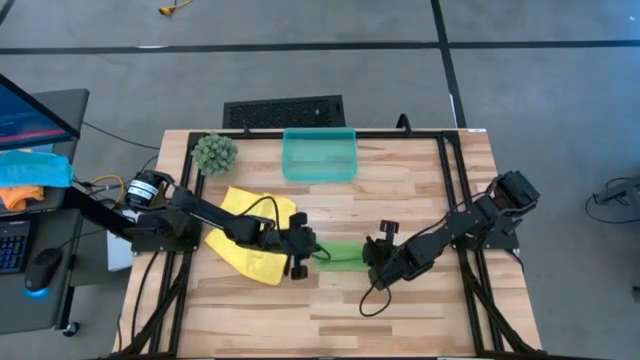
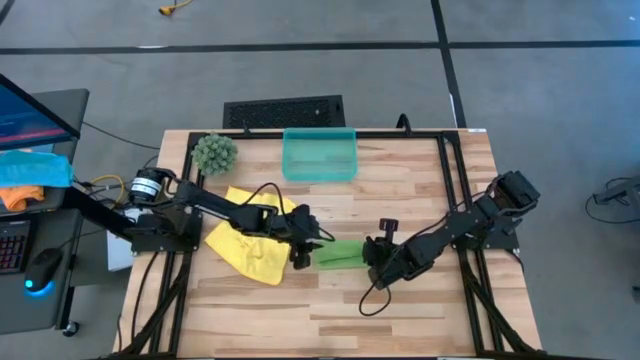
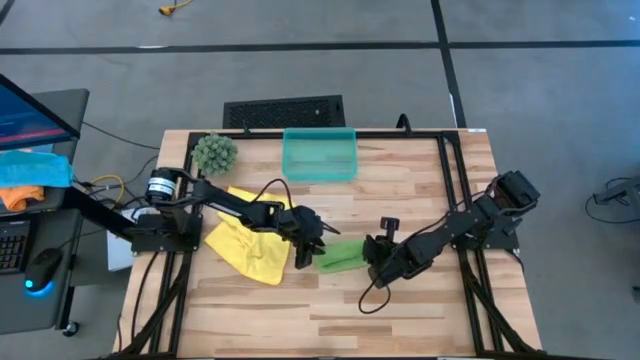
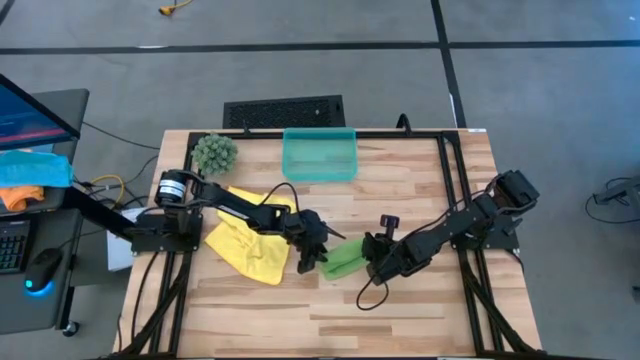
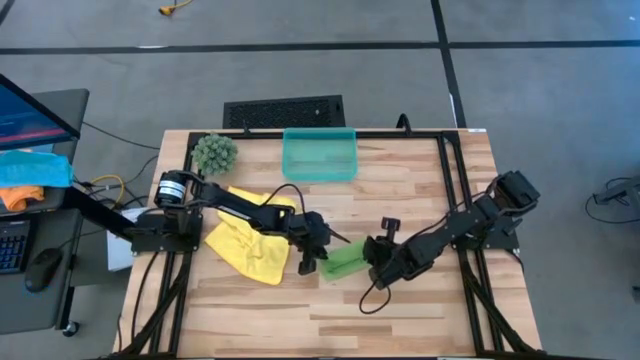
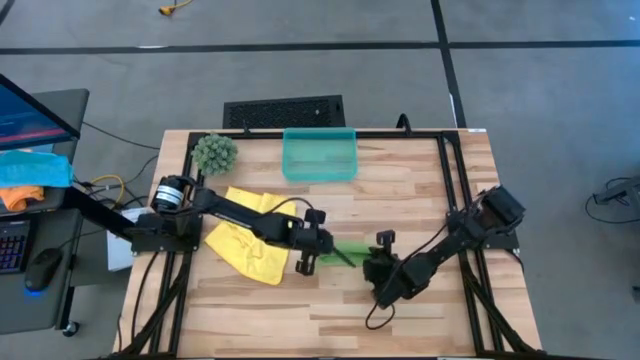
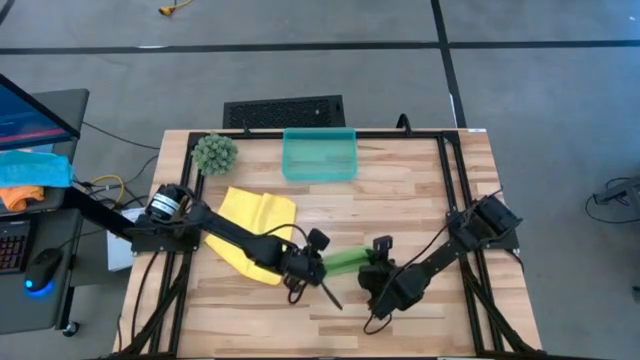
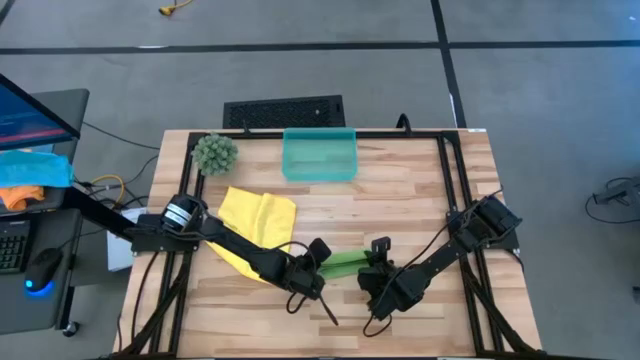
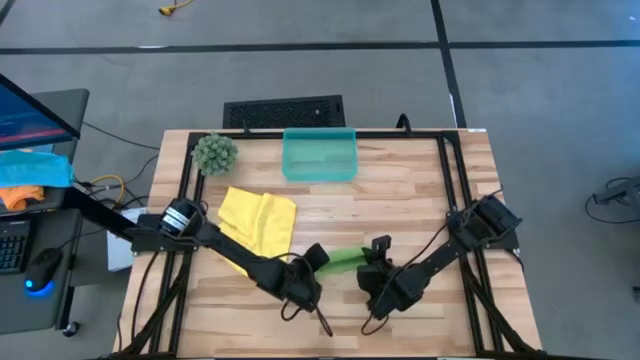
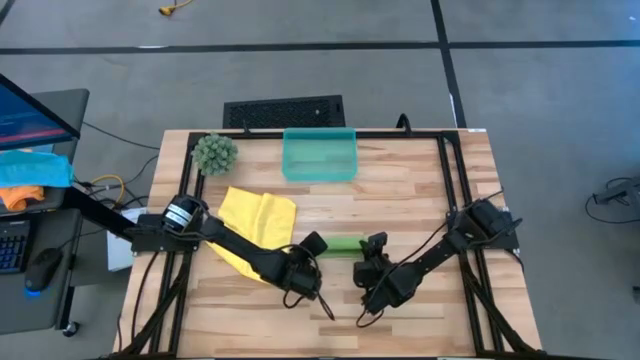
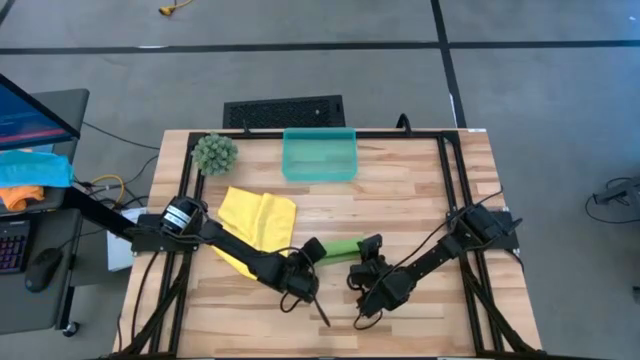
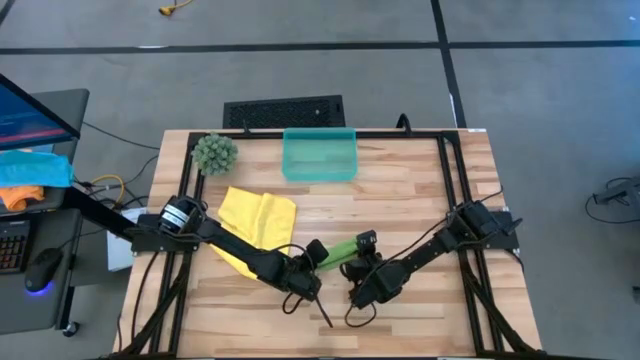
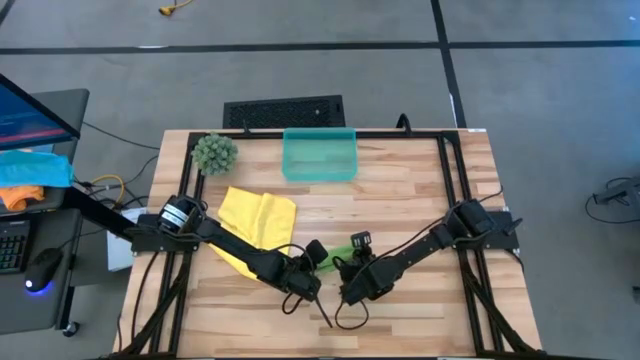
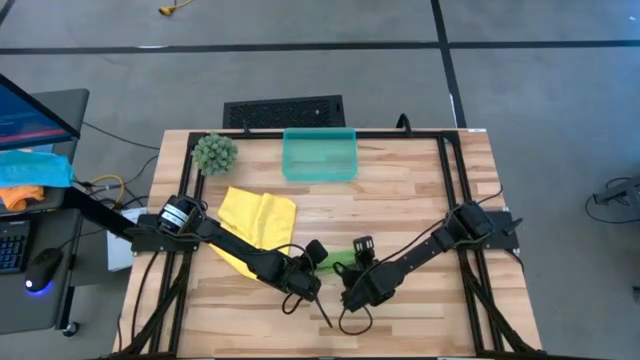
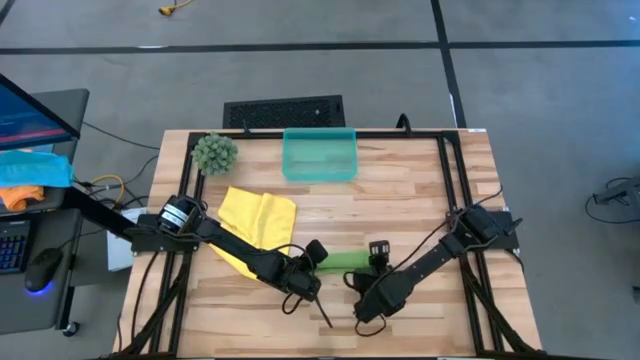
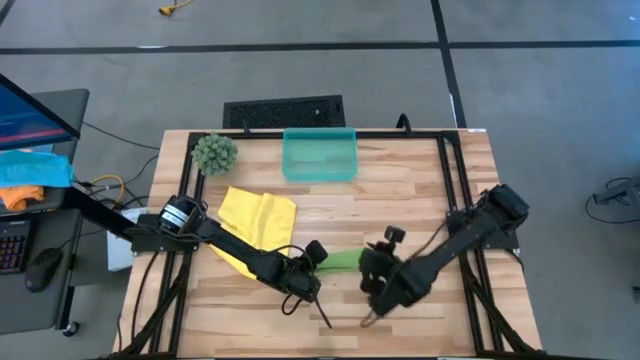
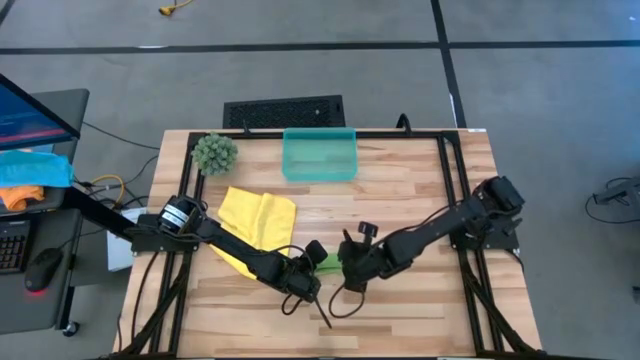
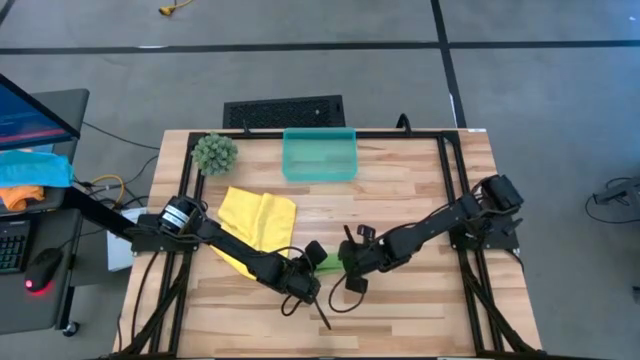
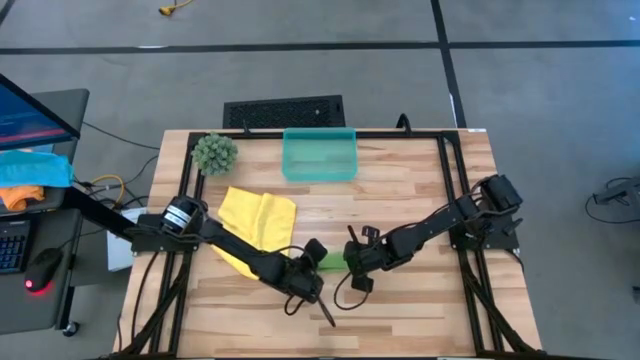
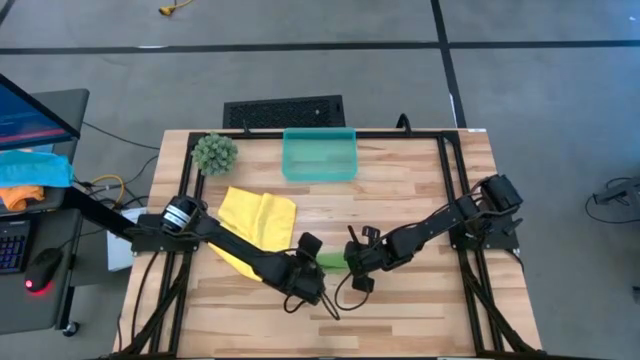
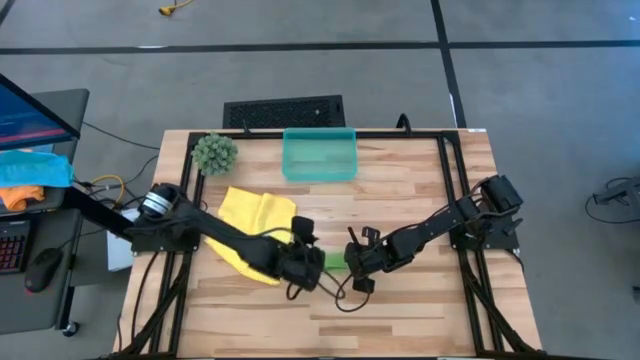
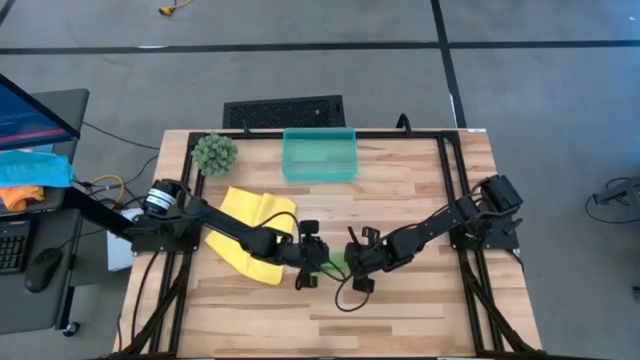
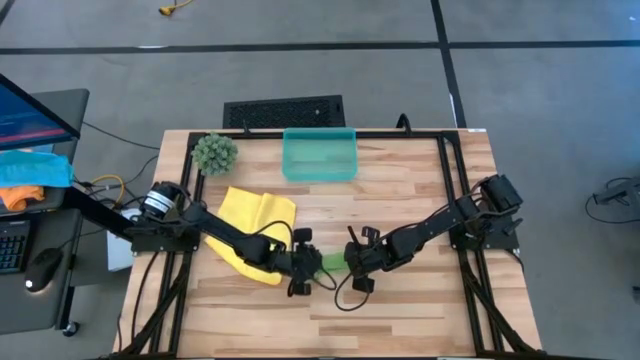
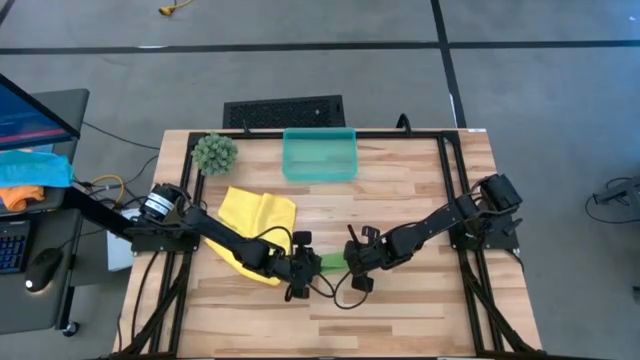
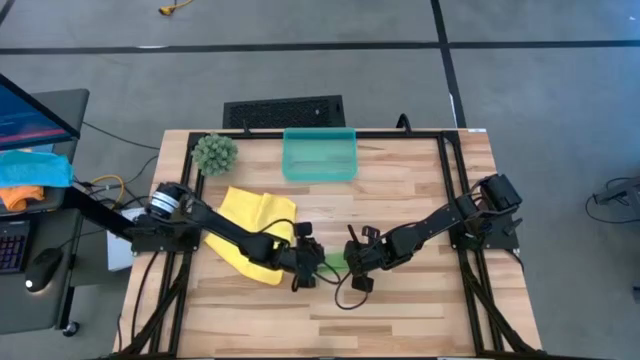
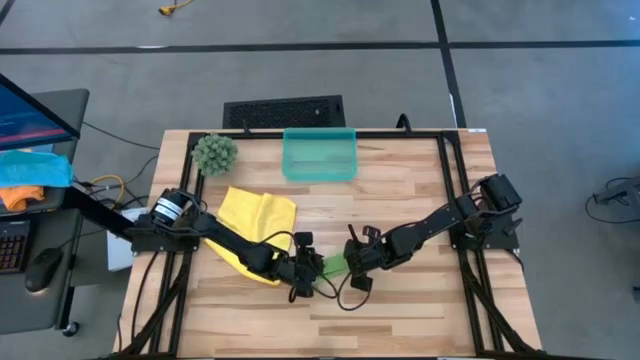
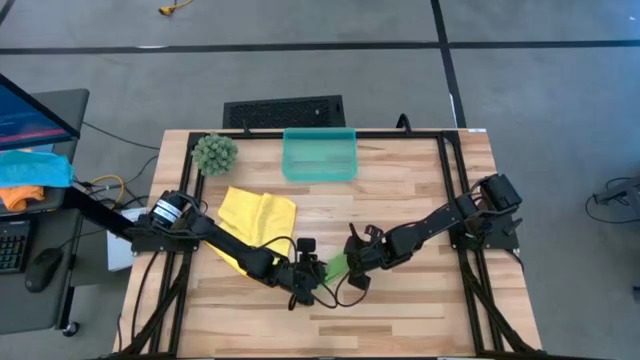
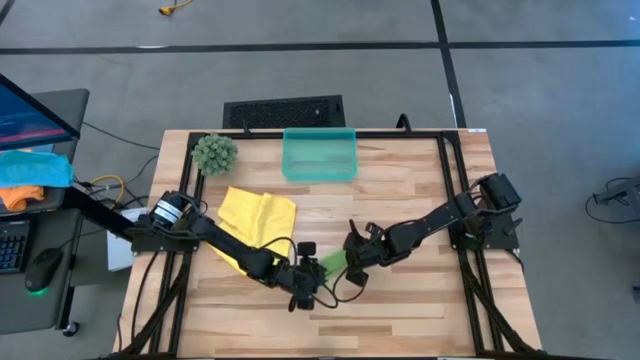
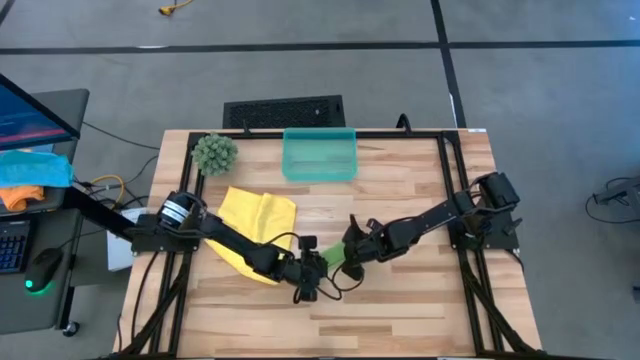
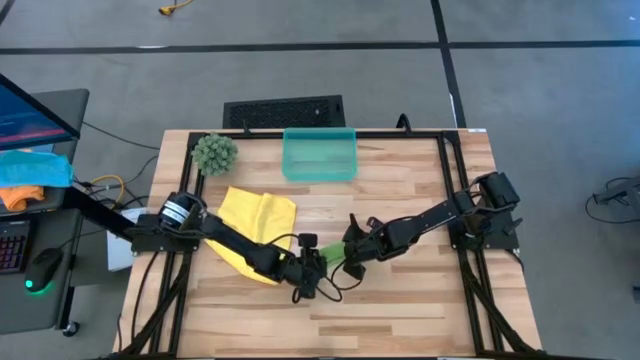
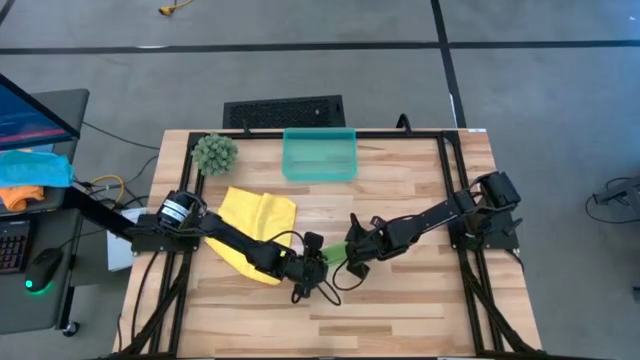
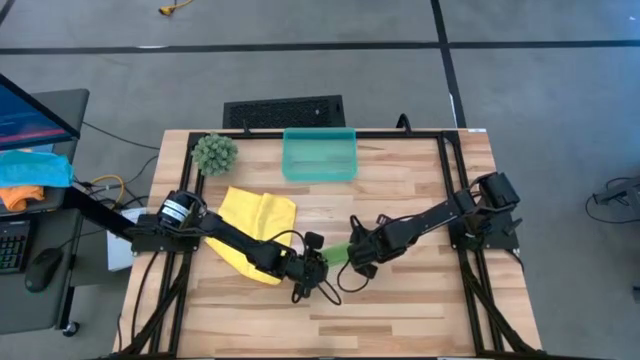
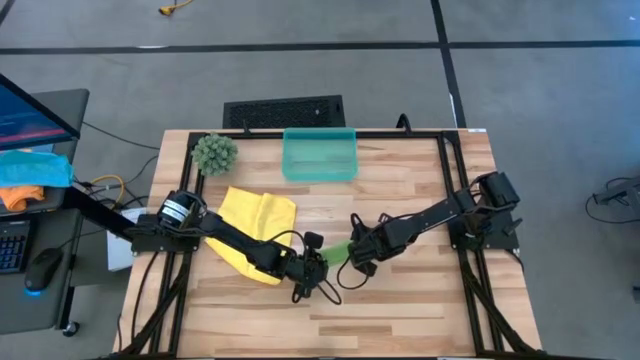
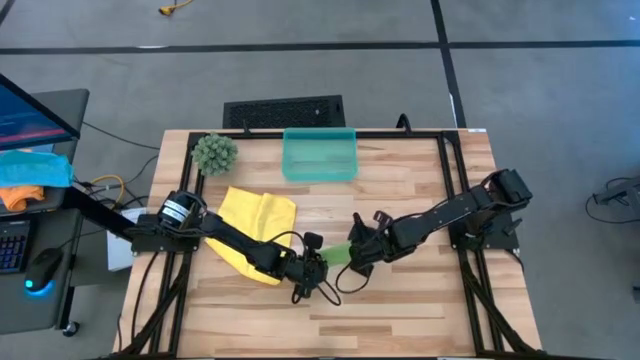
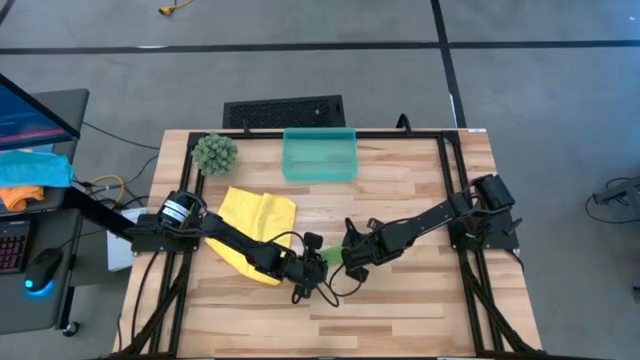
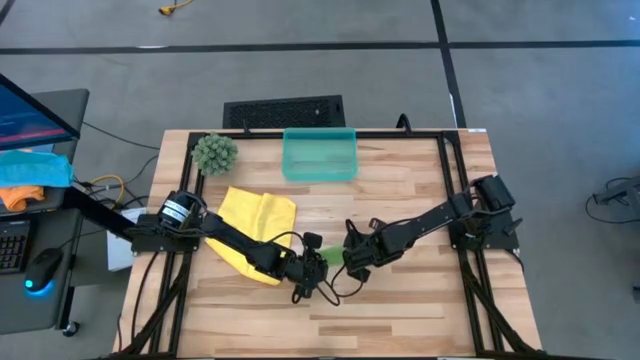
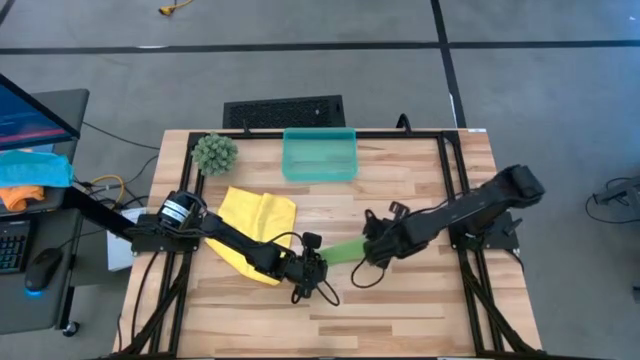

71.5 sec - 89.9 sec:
Task: Roll microfiber towels into tight, uniform cylinder then place into a basket
Roll the green microfiber cloth
